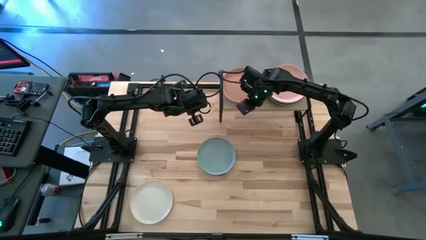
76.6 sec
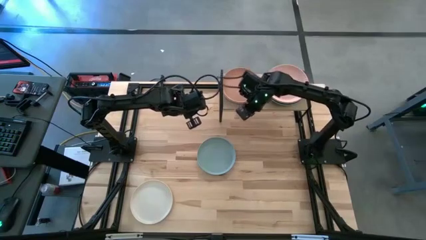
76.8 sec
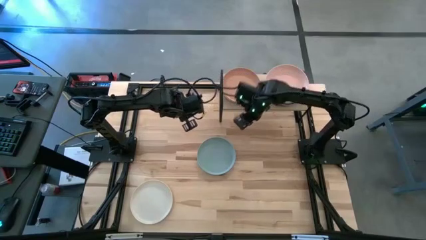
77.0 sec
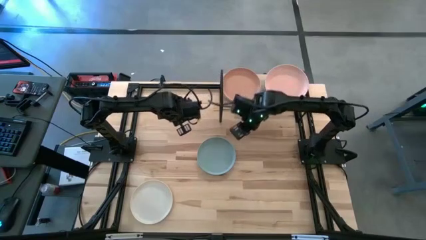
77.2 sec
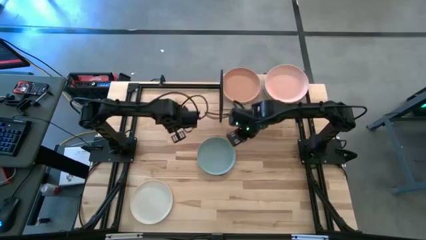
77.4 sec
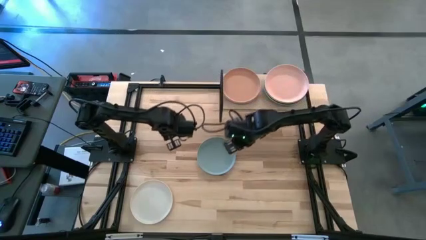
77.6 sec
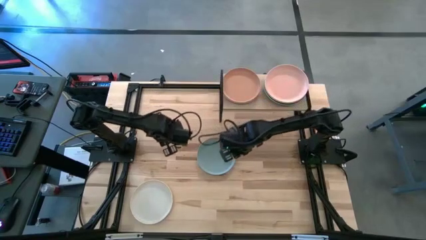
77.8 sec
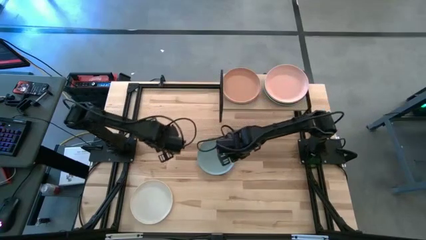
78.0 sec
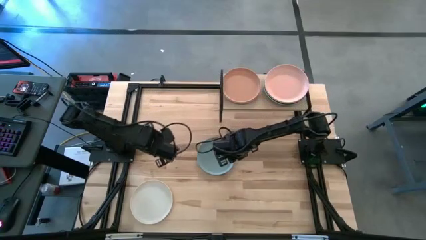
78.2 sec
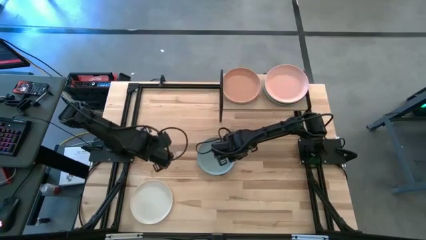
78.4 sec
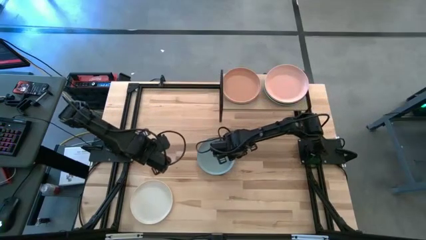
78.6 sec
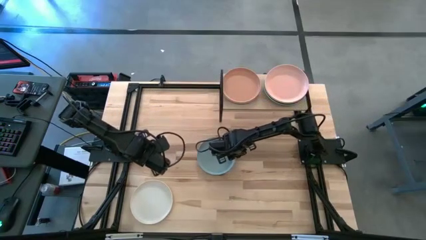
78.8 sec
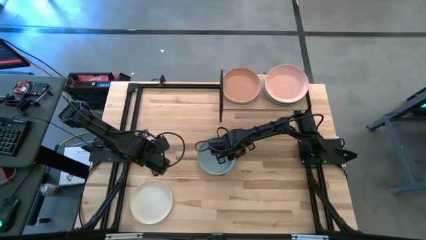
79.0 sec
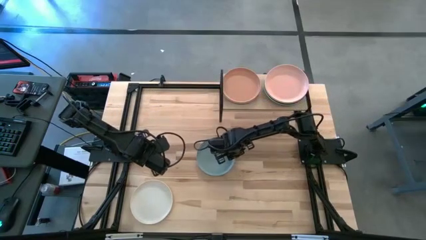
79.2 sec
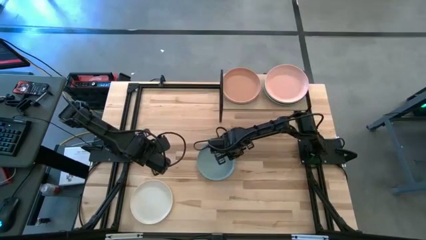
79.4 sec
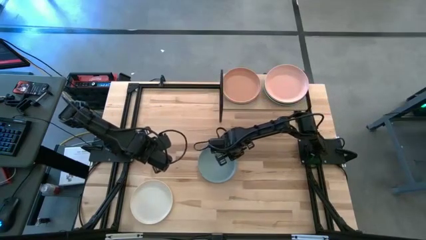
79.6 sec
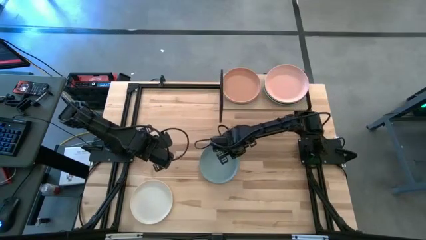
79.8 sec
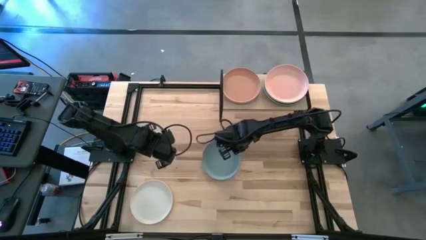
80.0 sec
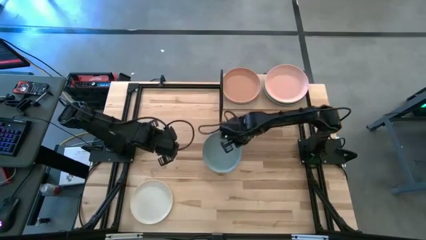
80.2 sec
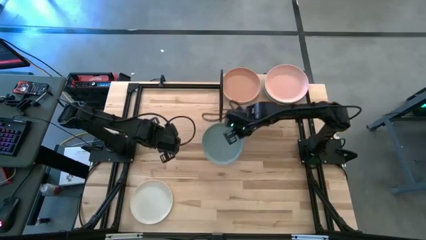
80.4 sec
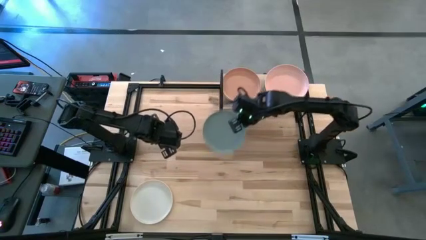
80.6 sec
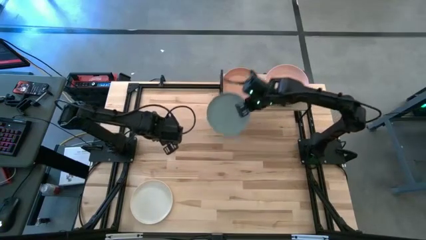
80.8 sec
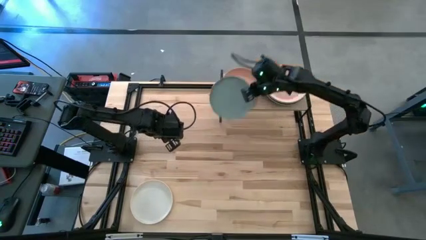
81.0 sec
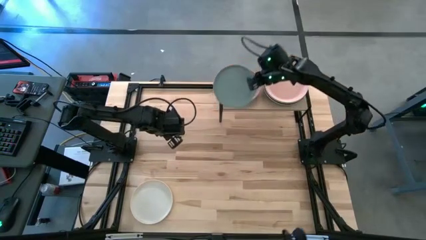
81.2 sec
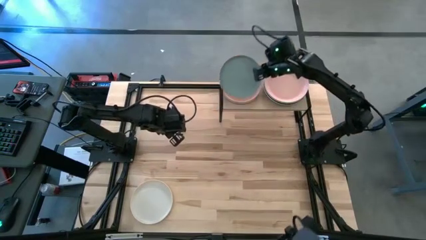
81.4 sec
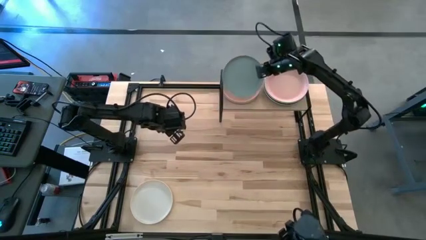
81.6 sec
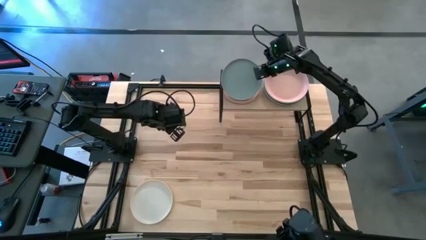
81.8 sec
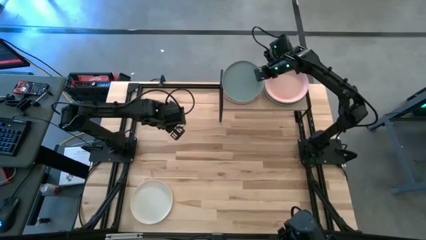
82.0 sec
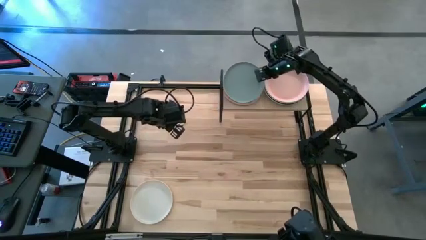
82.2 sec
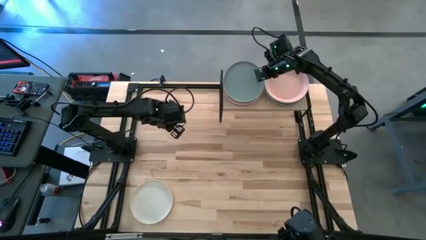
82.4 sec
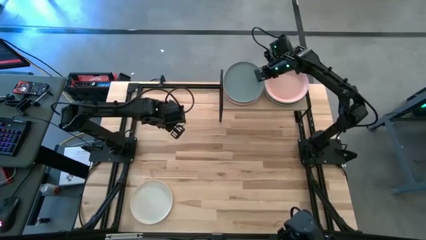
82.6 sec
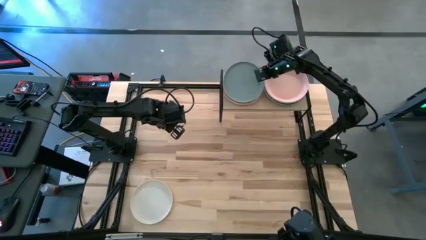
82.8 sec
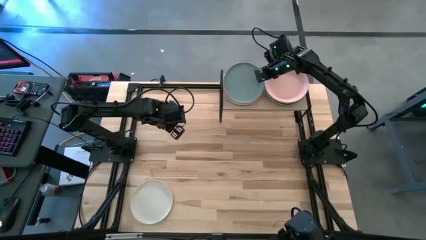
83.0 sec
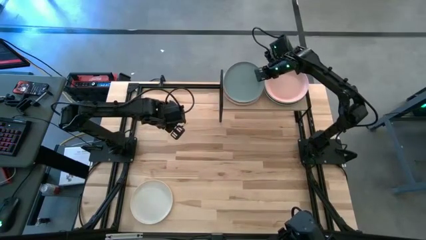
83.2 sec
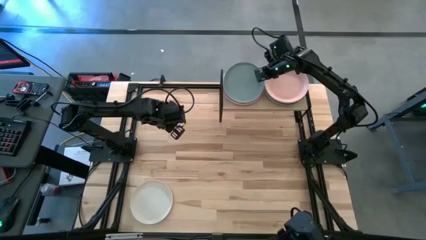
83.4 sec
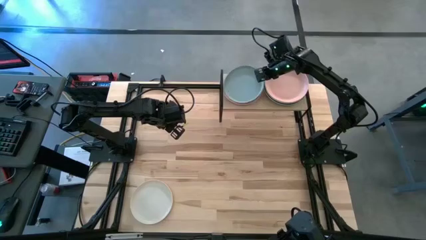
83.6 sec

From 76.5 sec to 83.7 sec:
Task: Place and stack plates onto a shelf
Stack the light blue plate on top of the brown stacked plates on the shelf

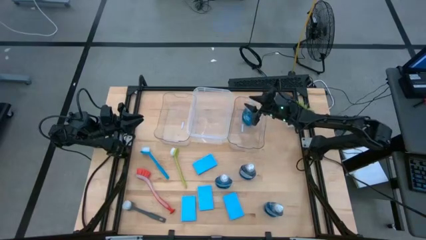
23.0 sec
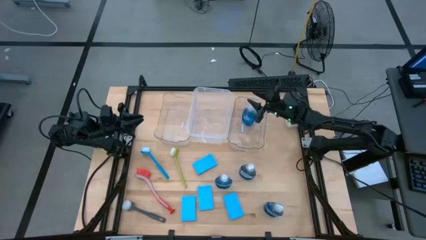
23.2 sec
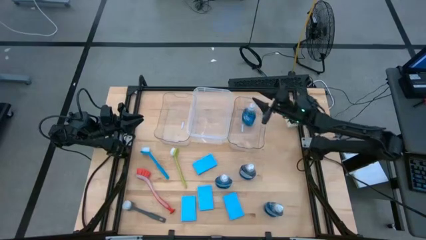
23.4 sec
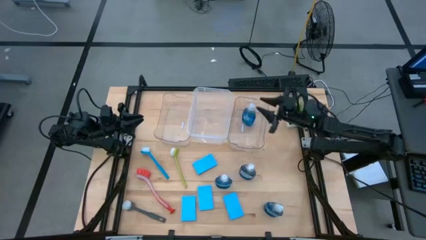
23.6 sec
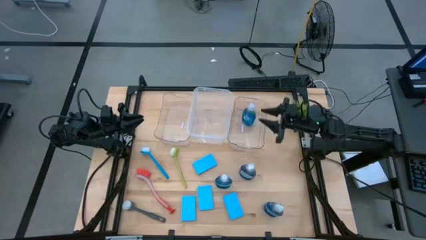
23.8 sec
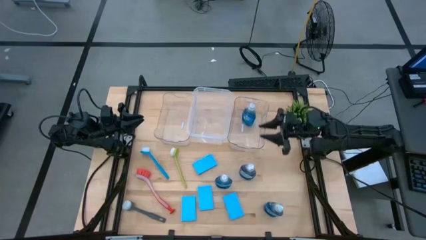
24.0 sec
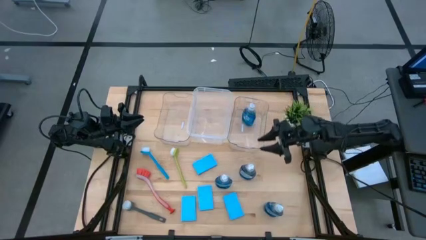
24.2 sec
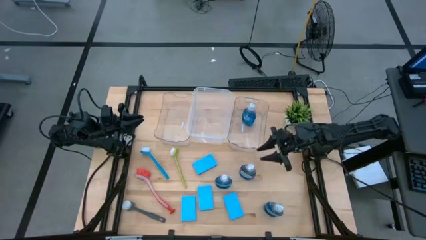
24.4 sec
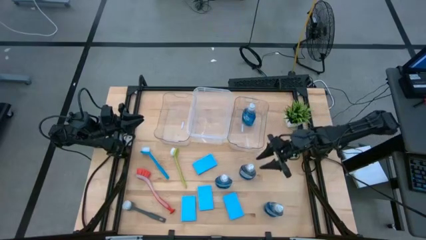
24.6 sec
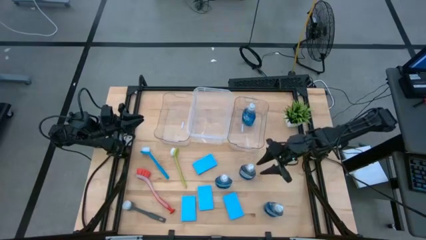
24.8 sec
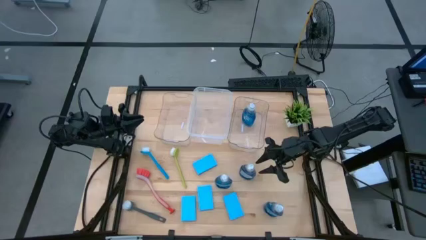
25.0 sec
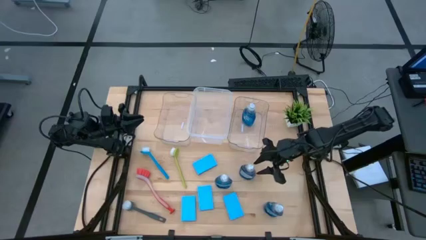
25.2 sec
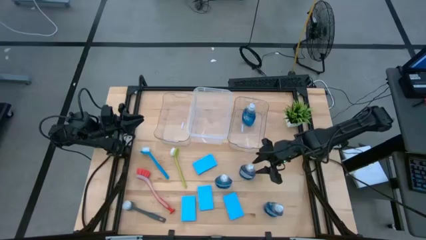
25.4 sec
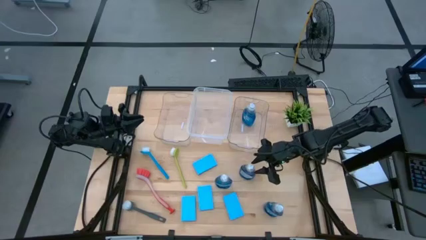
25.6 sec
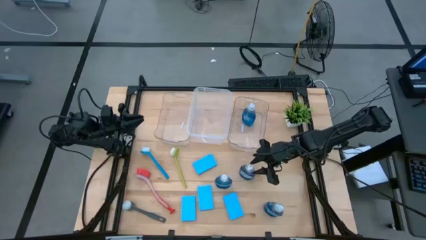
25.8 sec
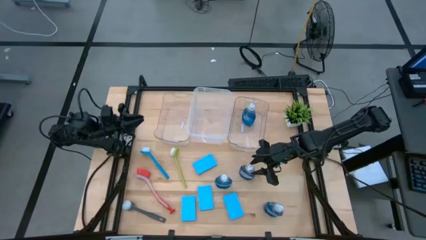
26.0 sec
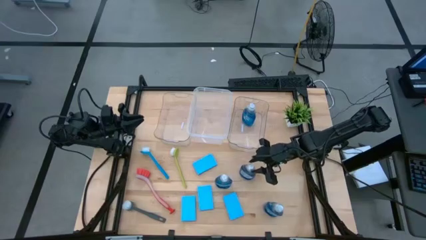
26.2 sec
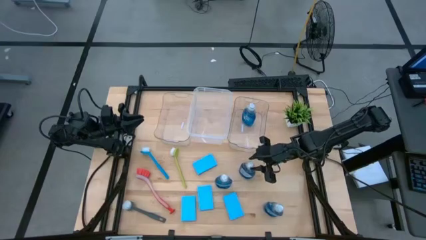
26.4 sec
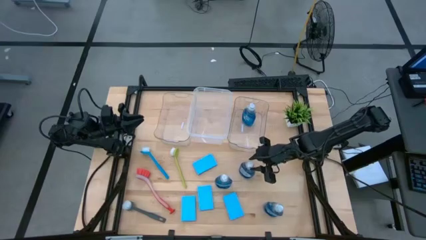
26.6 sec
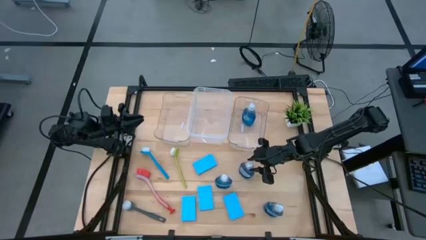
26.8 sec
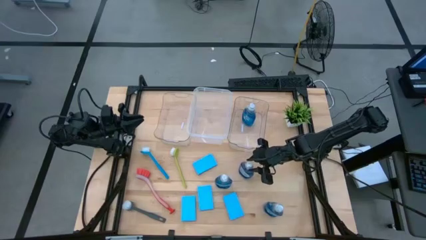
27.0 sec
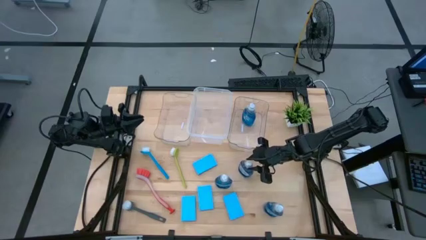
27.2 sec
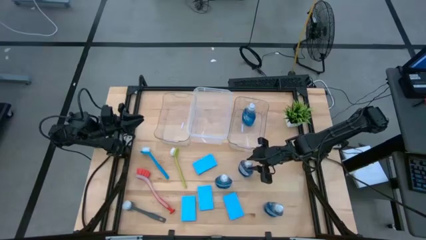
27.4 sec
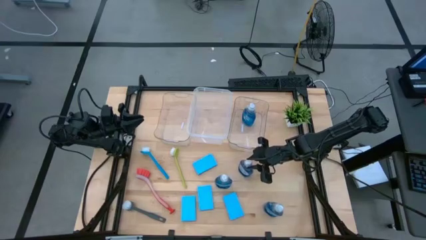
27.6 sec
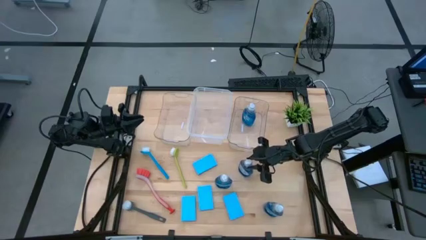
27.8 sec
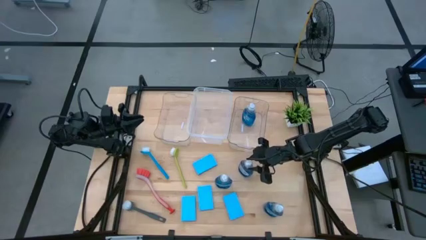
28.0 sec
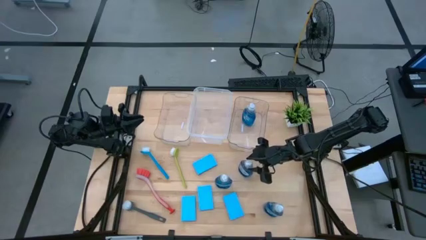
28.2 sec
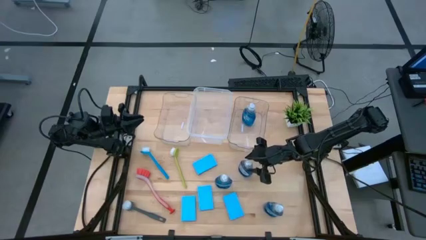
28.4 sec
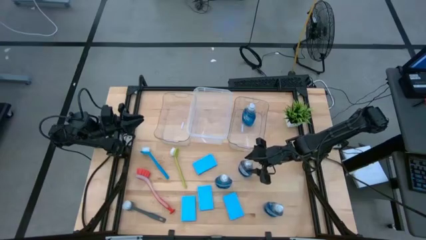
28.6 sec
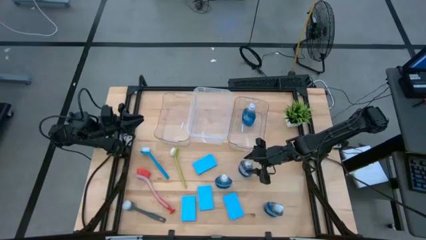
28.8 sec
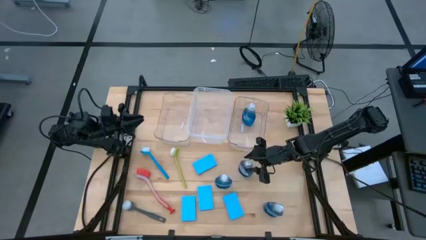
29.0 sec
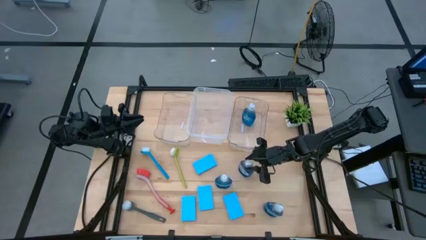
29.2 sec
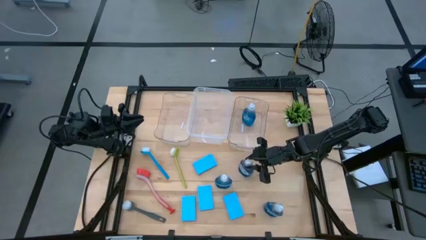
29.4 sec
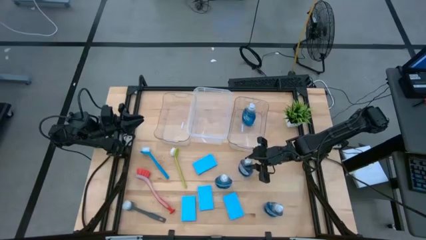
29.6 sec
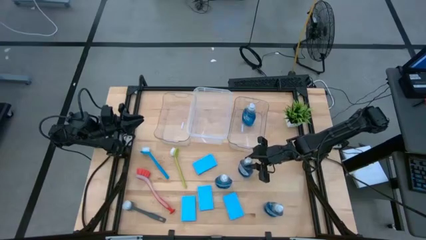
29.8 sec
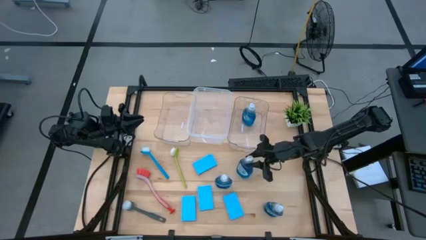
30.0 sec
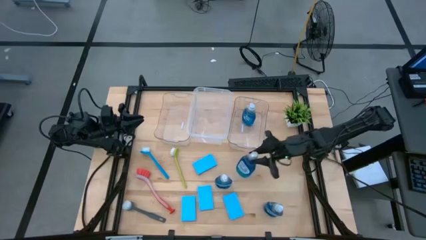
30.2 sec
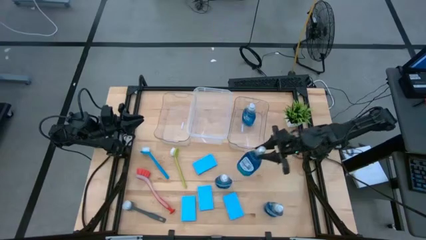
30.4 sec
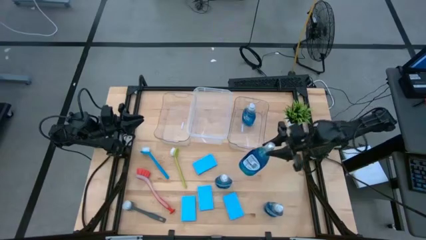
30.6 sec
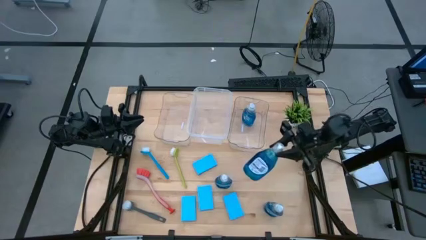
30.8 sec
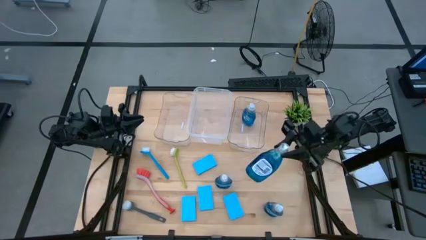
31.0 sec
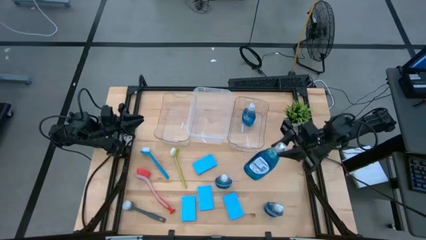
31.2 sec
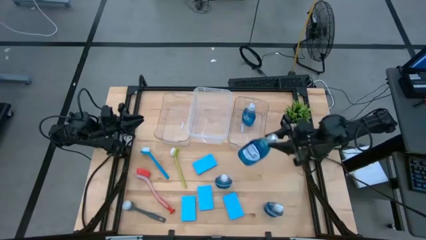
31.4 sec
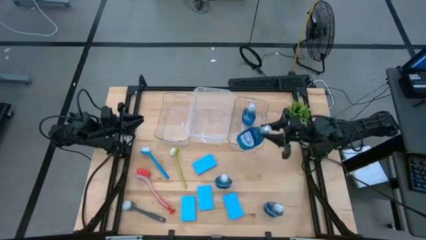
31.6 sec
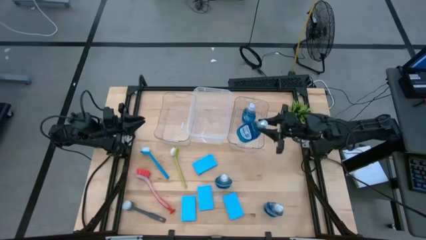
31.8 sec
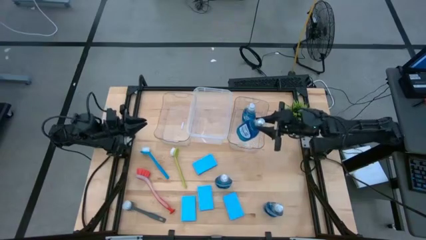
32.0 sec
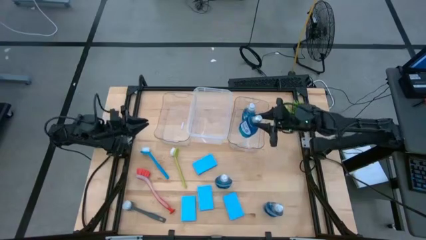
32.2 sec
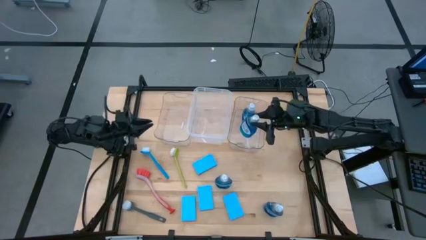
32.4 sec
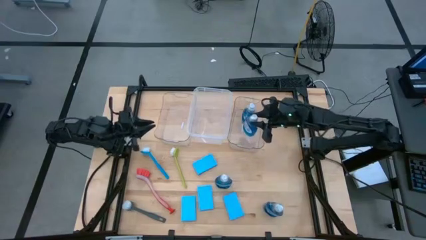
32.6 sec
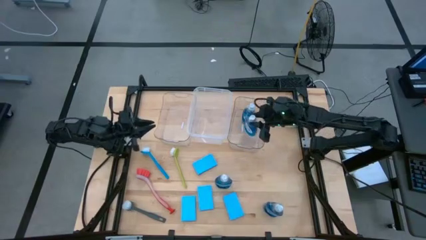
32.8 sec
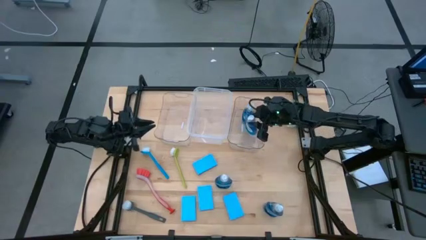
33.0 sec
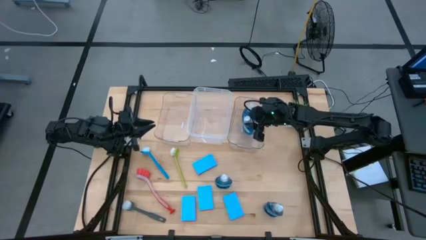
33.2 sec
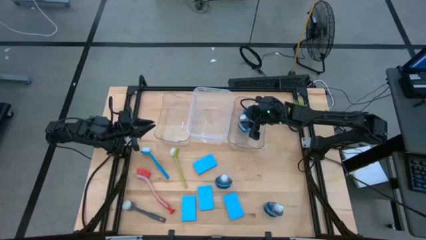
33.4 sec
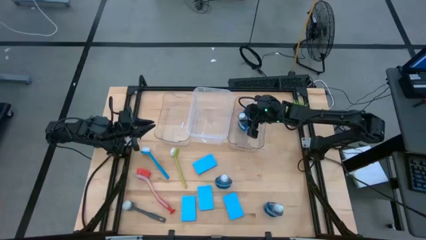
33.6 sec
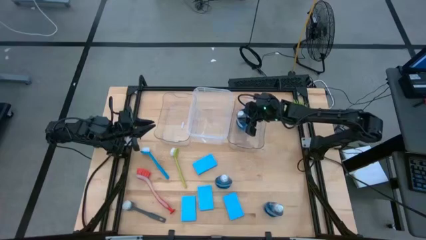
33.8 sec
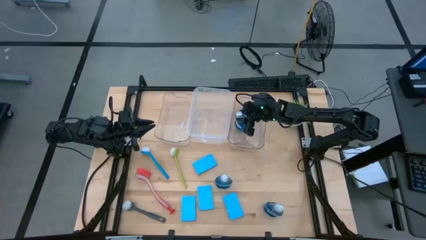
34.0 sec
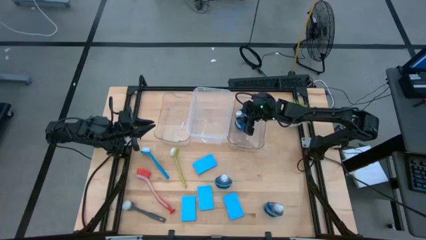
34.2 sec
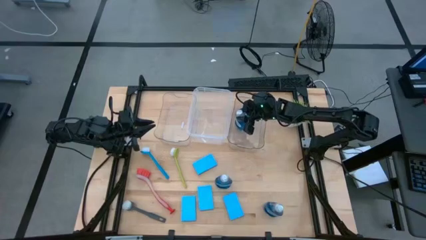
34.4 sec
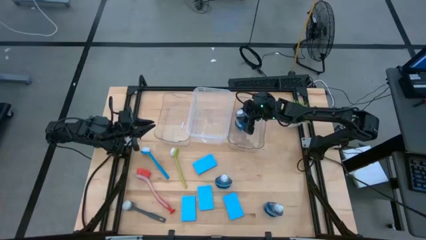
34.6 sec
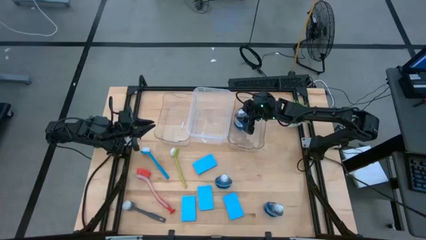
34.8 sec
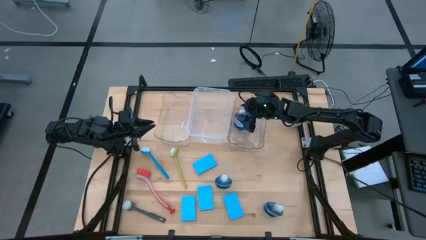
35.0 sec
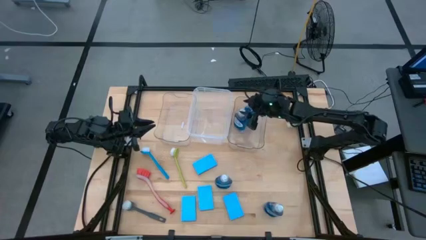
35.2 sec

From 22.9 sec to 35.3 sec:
Task: Pick & Place Kitchen Sink Supplies
Put the blue dish soap into the right transparent bin
